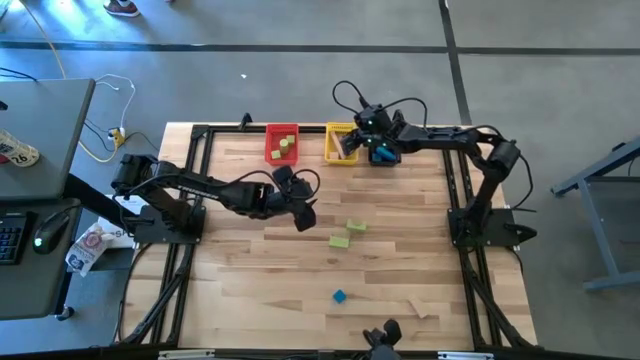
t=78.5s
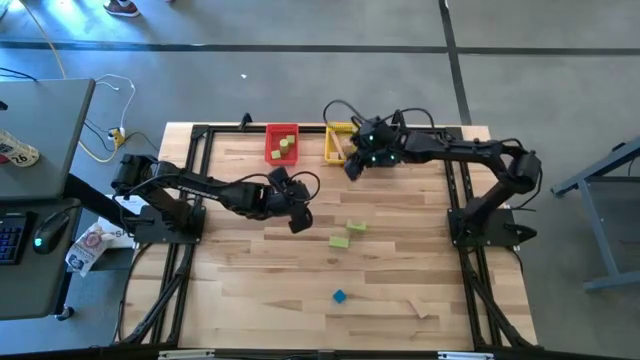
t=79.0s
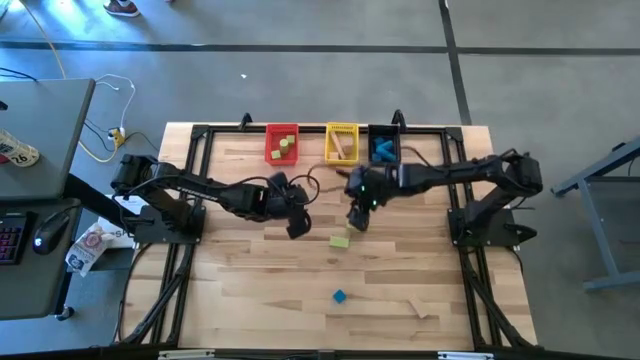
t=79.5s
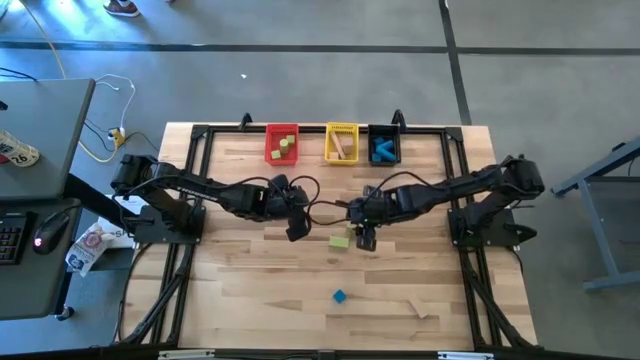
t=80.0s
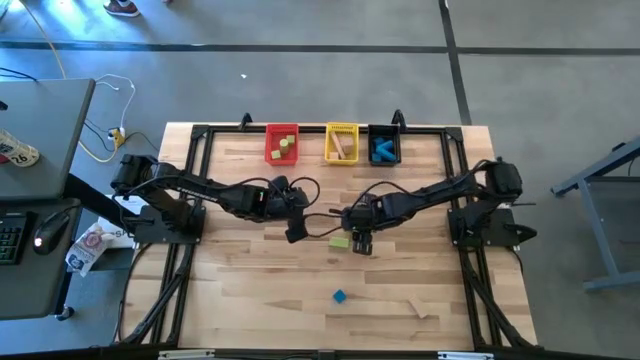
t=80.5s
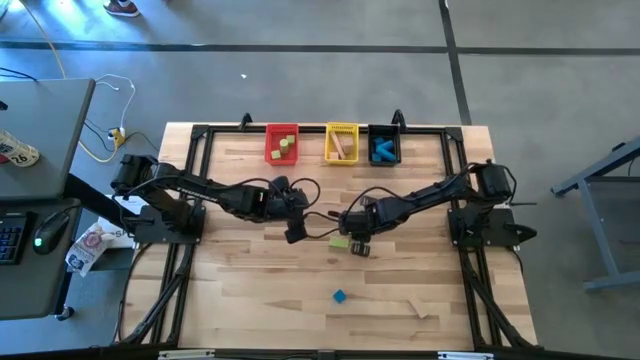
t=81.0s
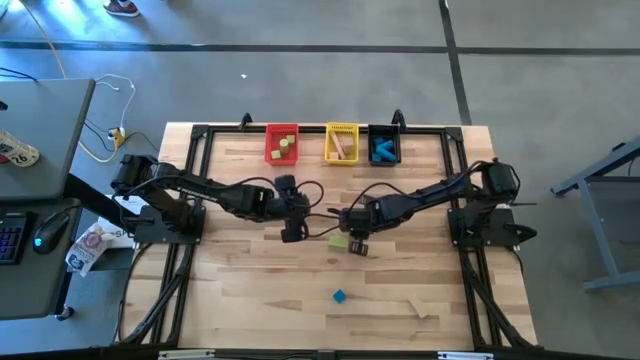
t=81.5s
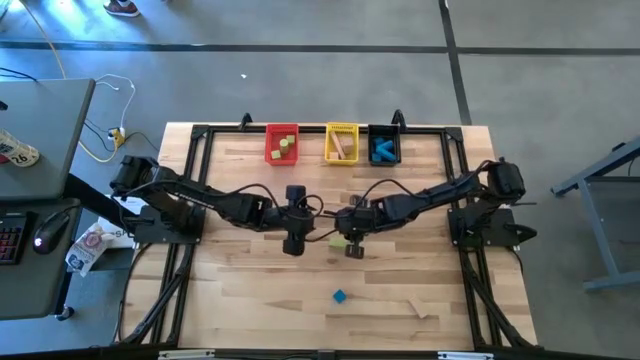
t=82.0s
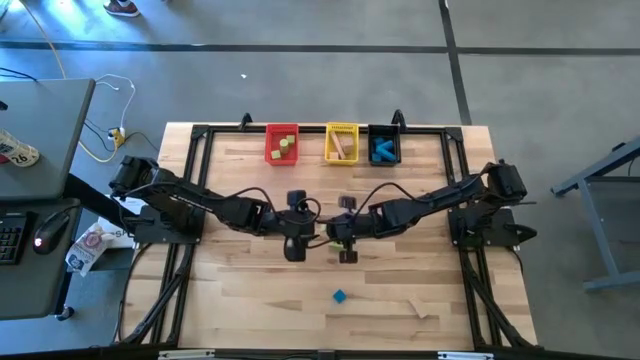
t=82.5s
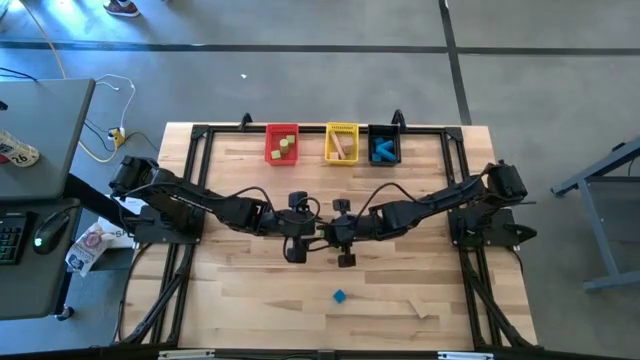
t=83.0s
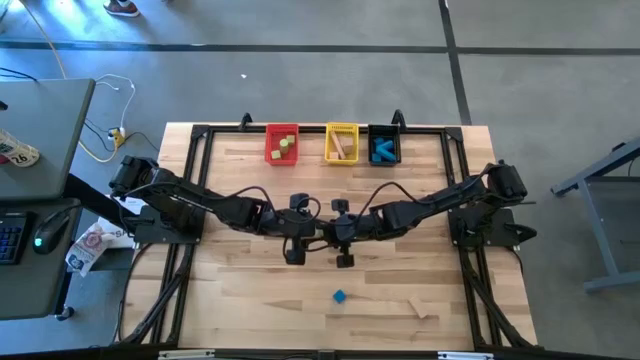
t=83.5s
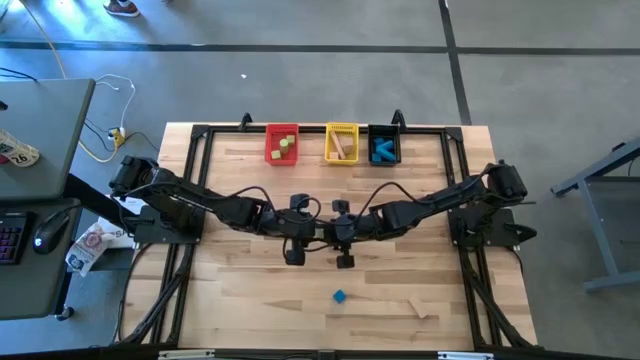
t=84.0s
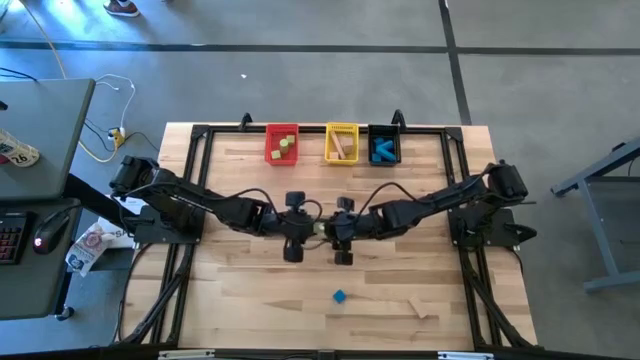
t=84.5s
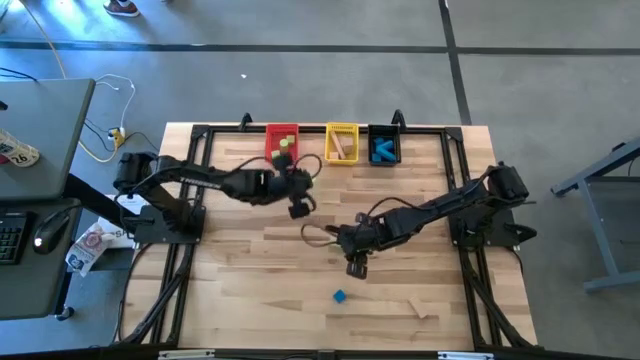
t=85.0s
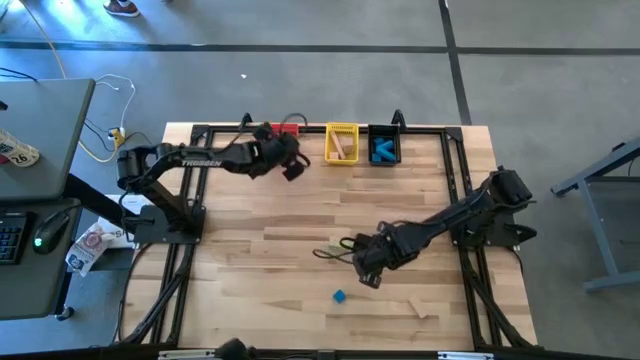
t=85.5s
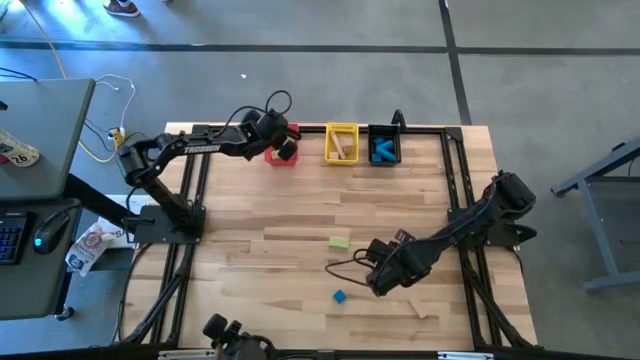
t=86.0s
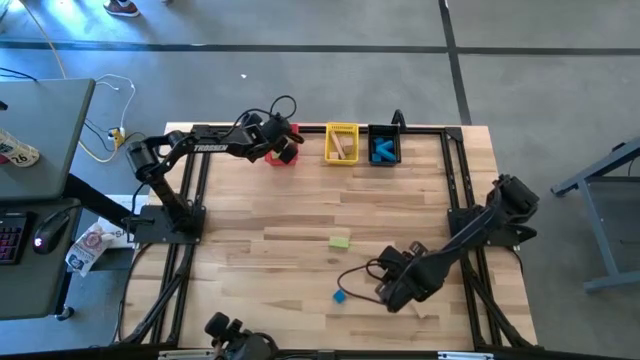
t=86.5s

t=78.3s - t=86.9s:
Task: Sort & place blocks by color
Put the green block into the red bin

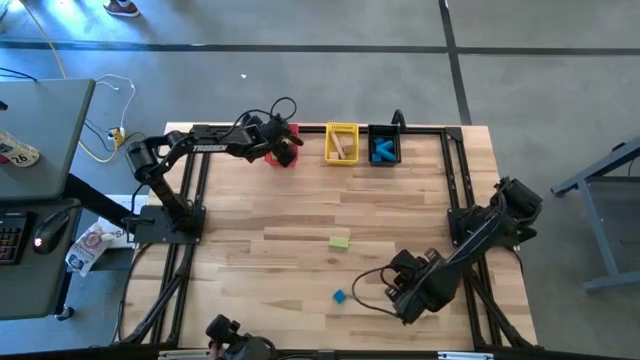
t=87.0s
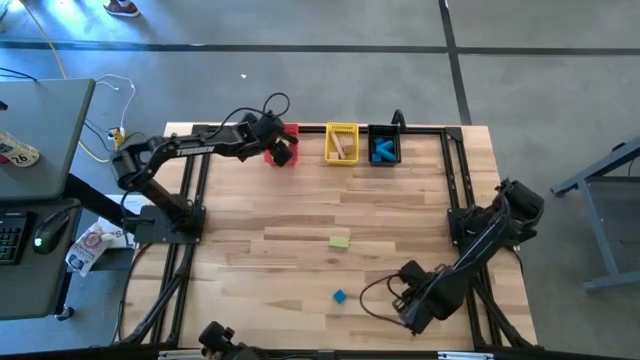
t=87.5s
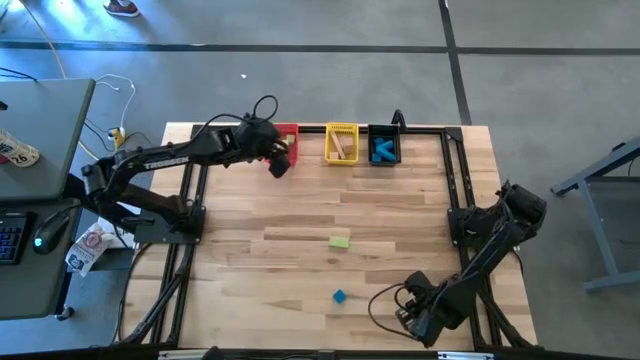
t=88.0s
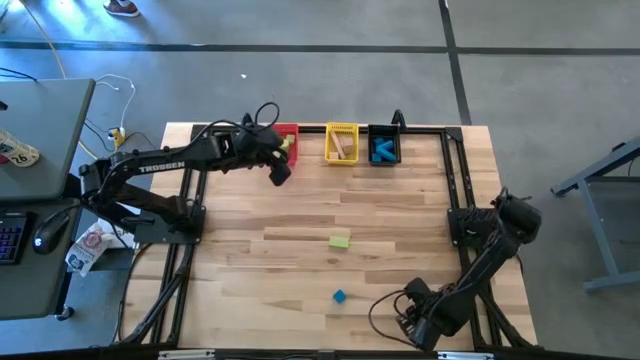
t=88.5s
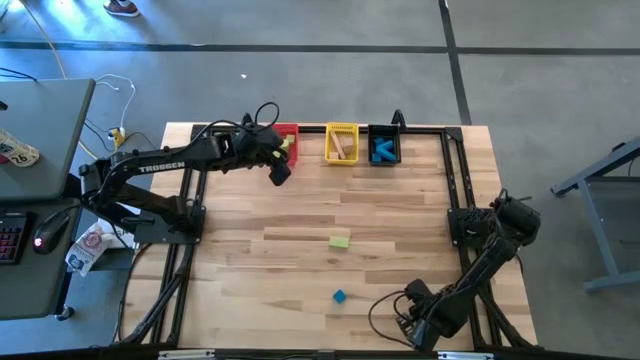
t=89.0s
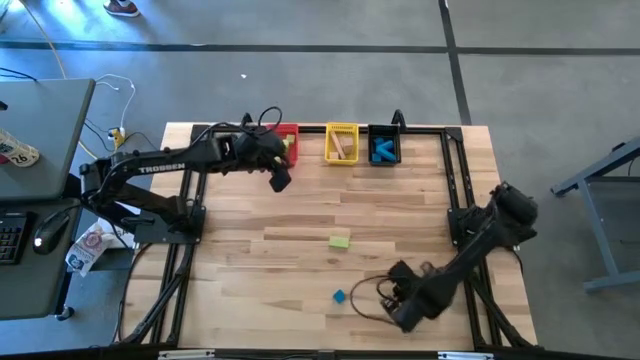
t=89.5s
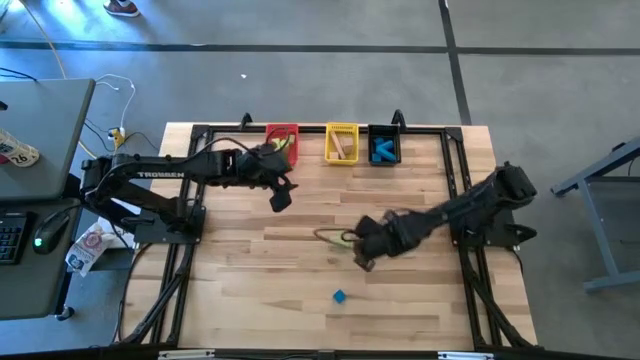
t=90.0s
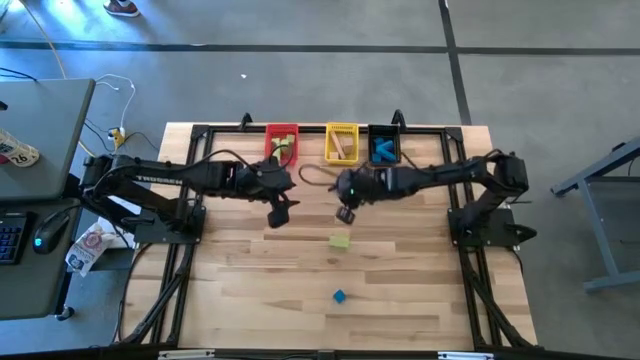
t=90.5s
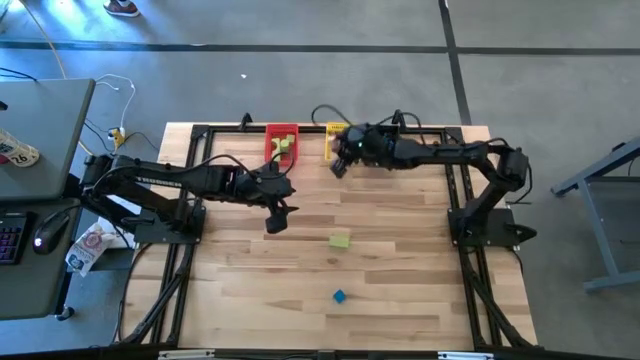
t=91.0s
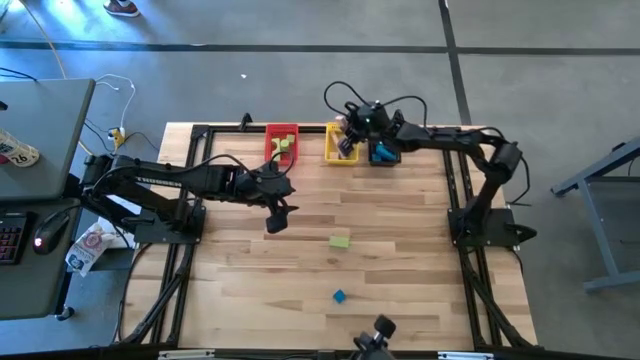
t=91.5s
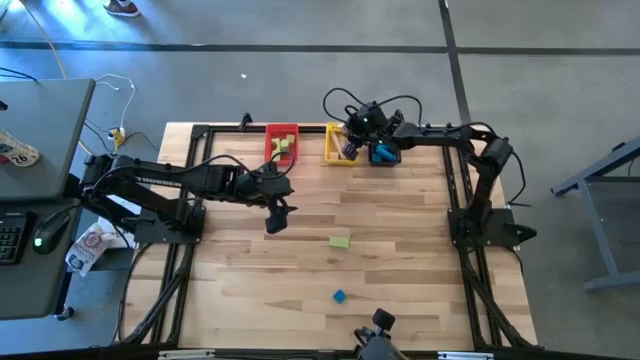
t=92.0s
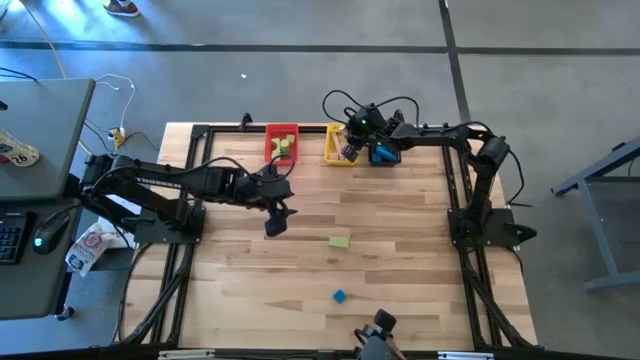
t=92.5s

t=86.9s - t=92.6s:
Put the beige block into the yellow bin

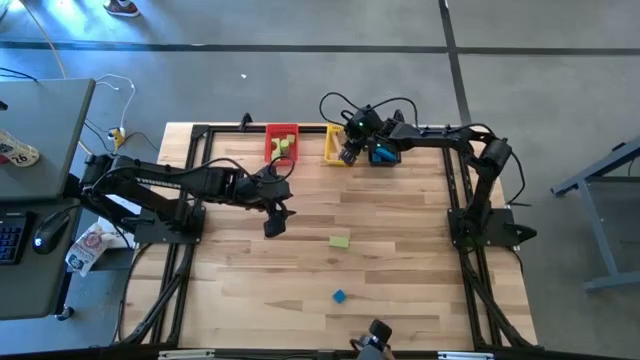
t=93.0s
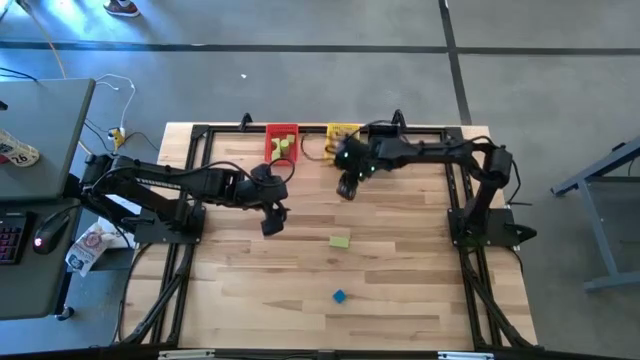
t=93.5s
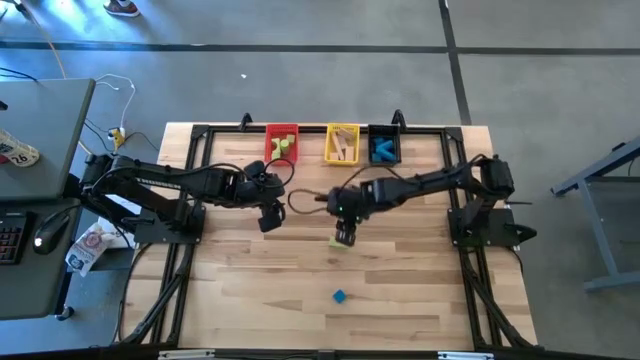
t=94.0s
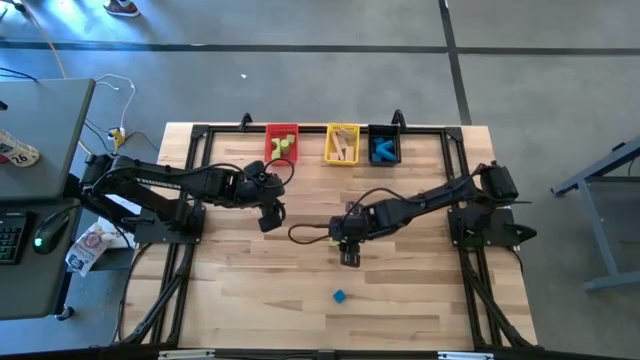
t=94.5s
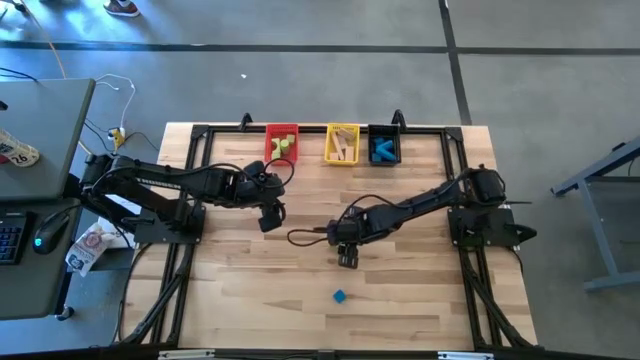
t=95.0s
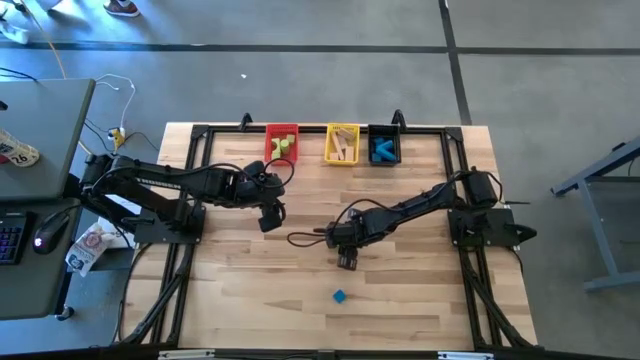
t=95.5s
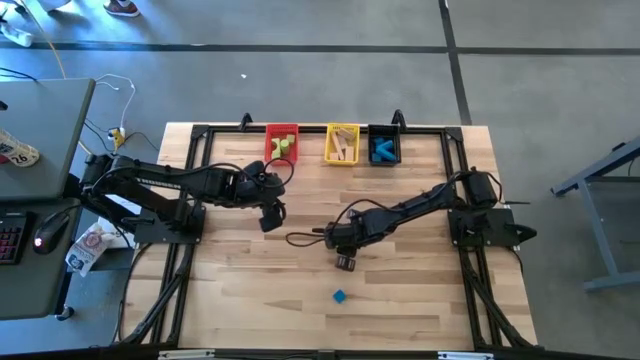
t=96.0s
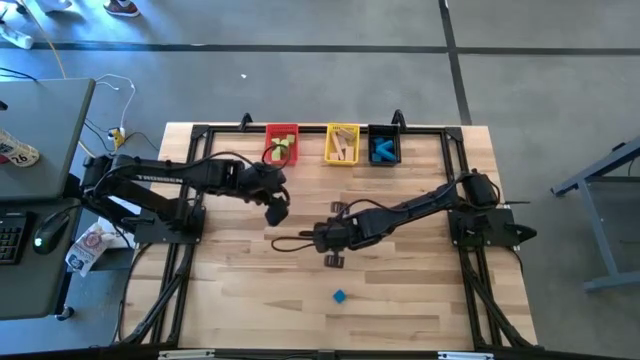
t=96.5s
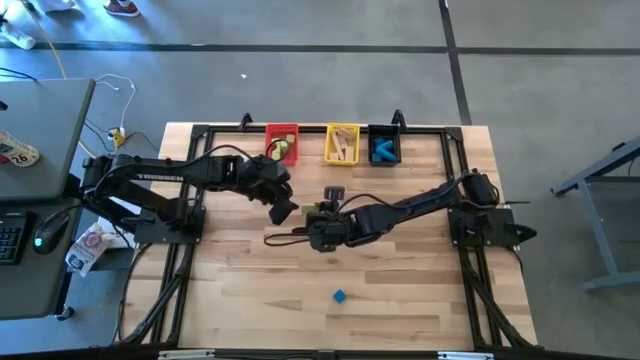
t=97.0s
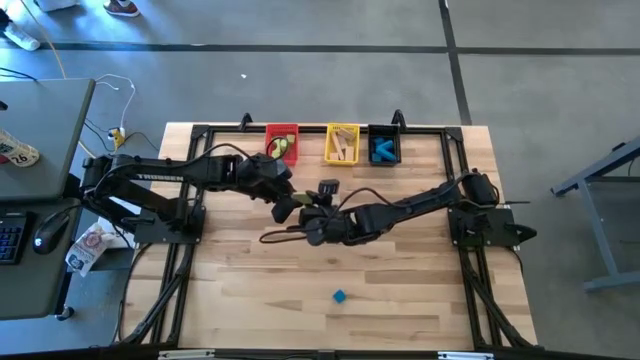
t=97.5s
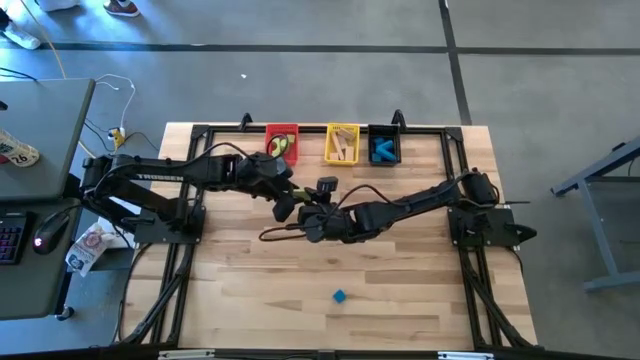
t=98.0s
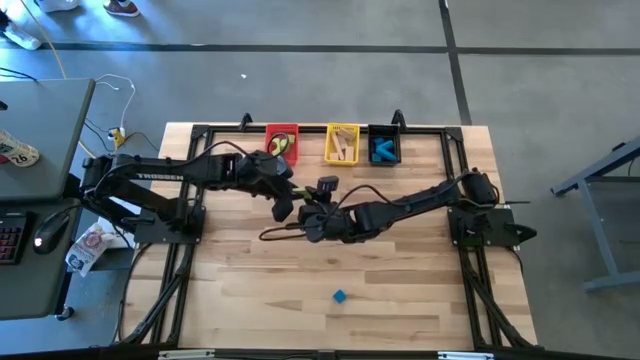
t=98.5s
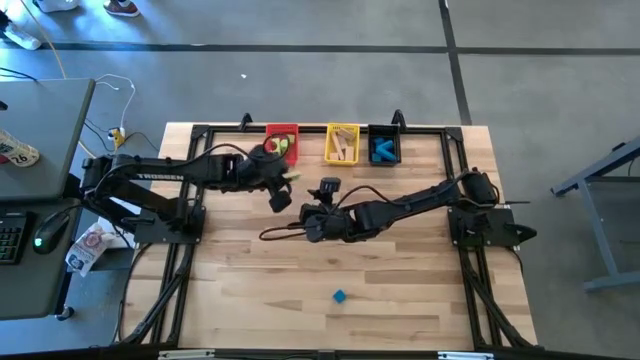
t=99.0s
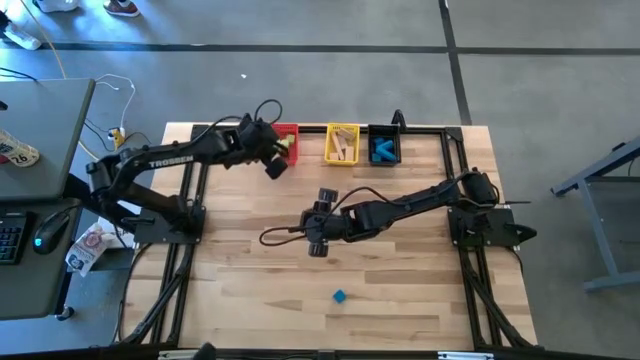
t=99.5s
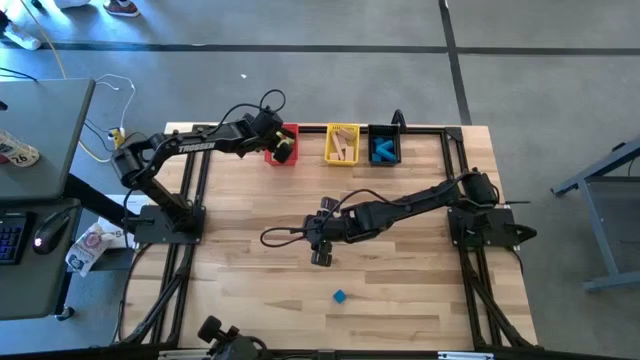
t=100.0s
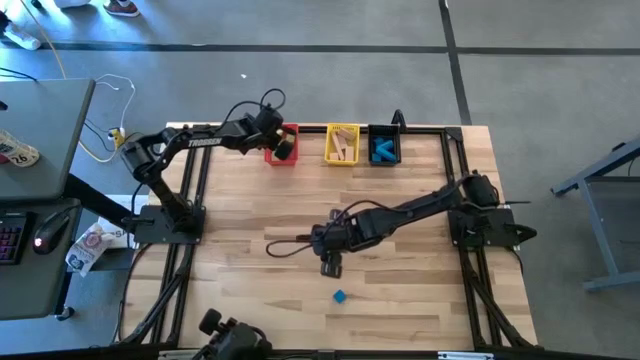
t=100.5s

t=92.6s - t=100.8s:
Put the green block into the red bin
